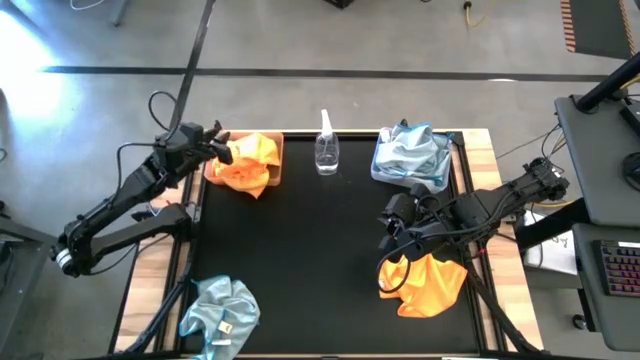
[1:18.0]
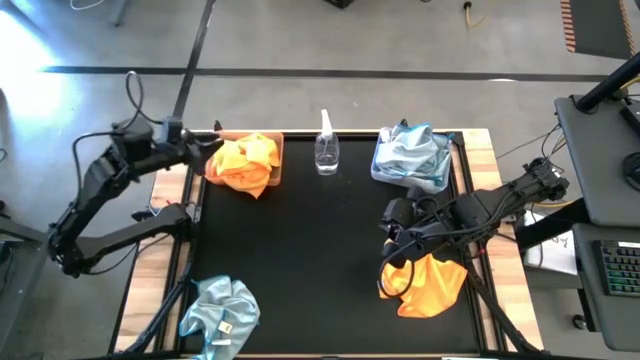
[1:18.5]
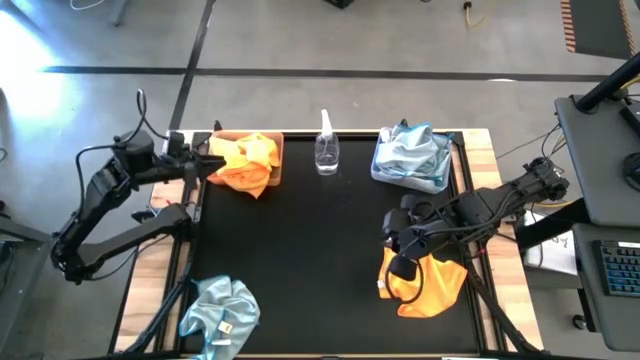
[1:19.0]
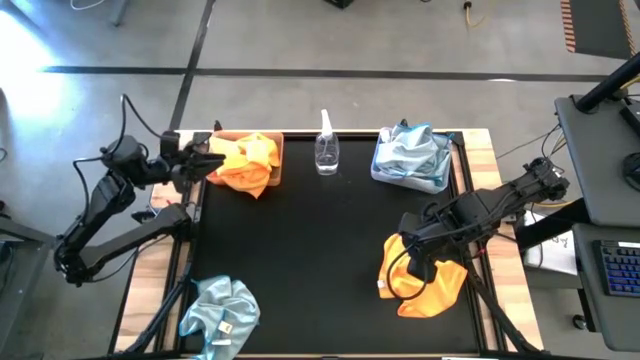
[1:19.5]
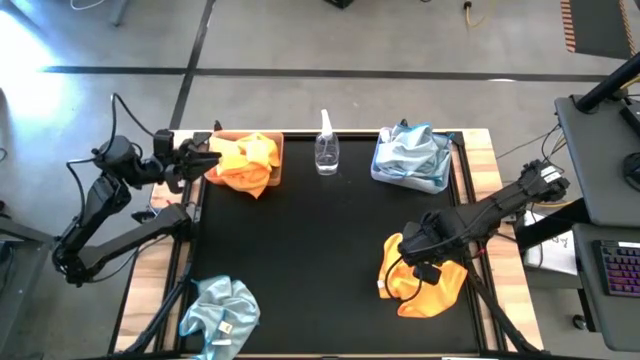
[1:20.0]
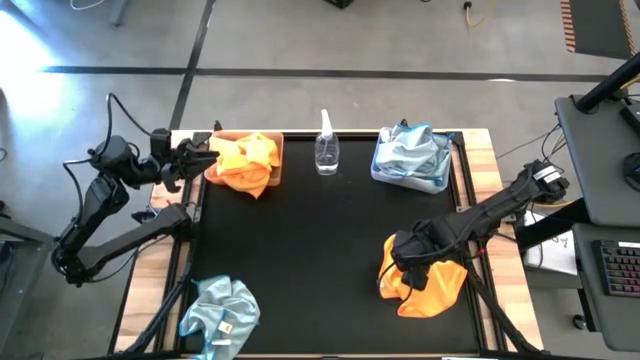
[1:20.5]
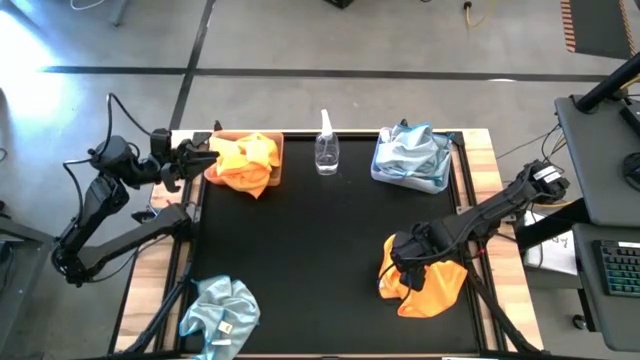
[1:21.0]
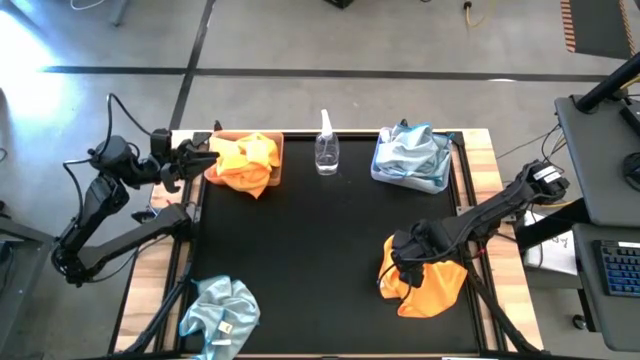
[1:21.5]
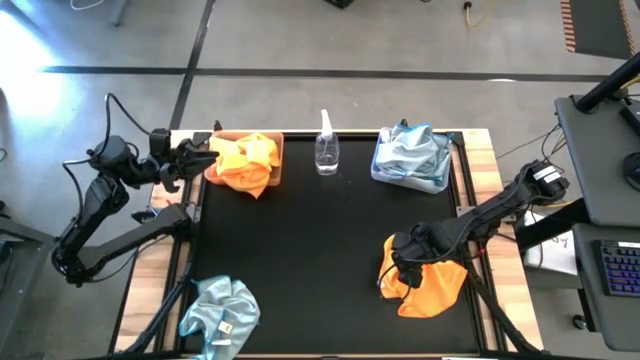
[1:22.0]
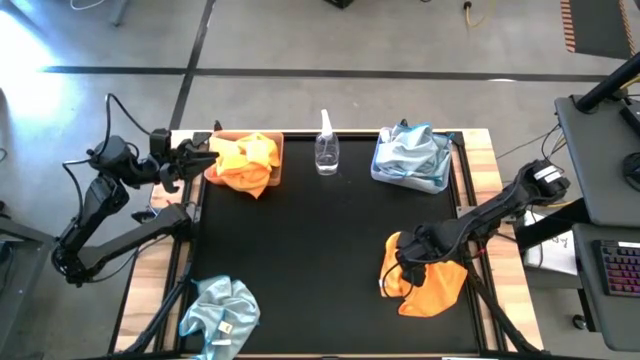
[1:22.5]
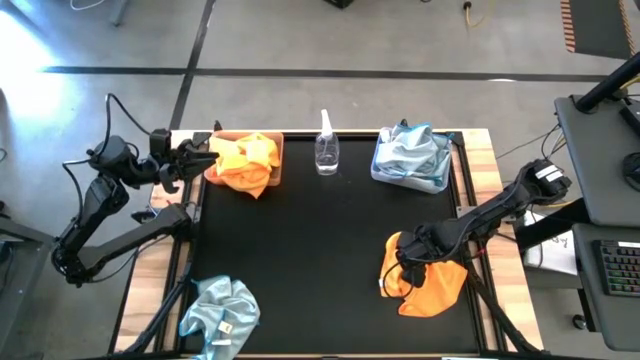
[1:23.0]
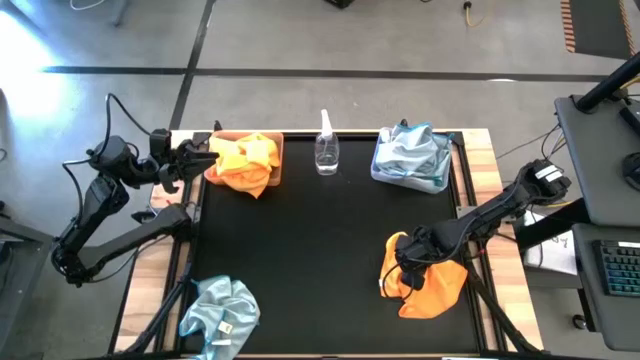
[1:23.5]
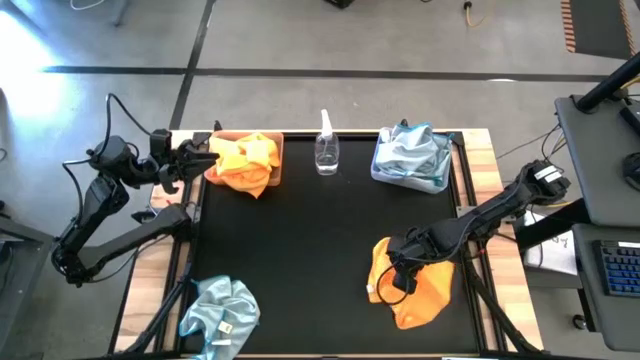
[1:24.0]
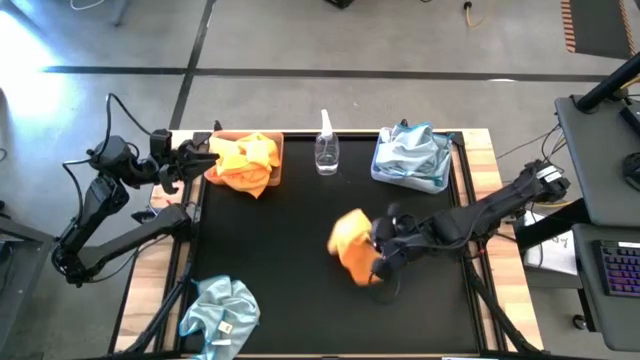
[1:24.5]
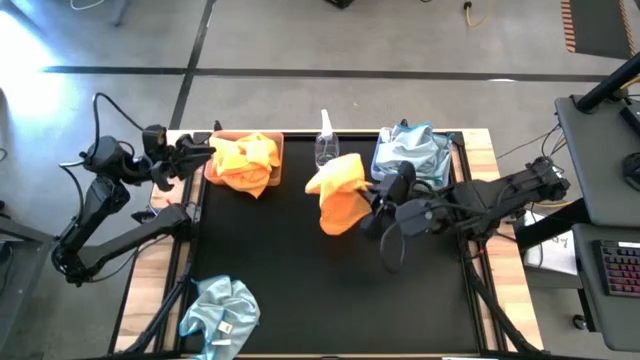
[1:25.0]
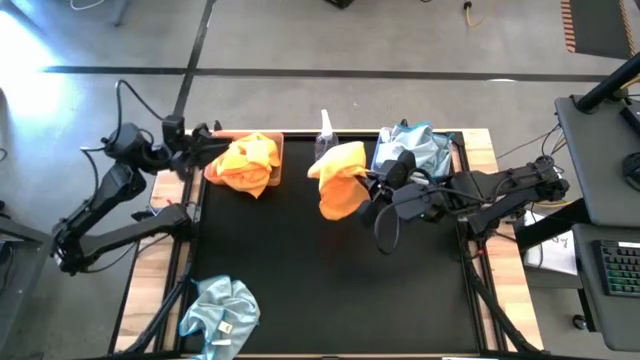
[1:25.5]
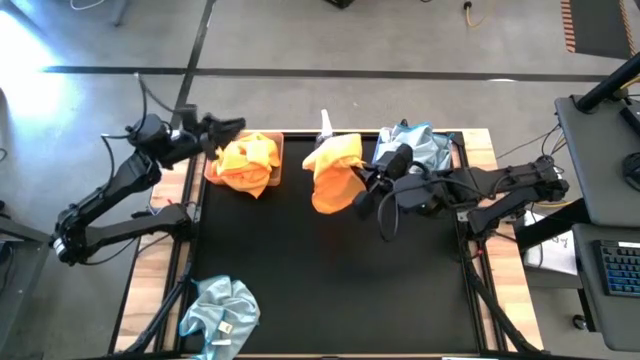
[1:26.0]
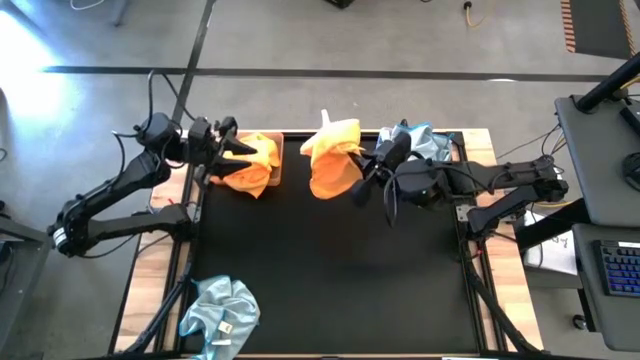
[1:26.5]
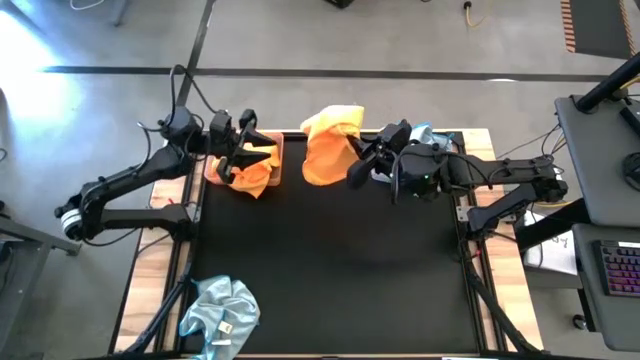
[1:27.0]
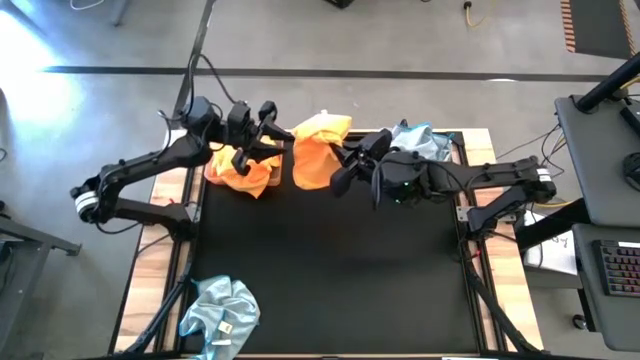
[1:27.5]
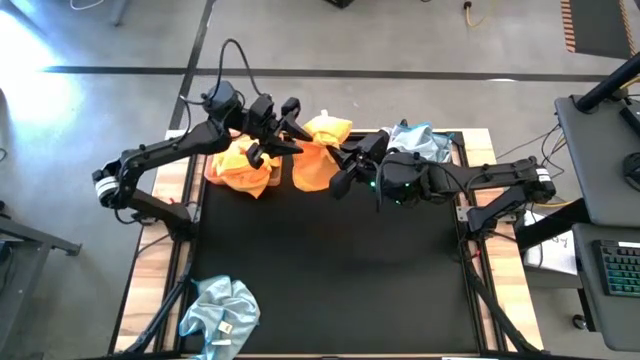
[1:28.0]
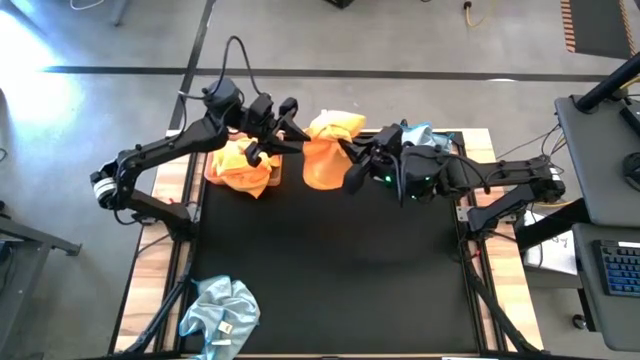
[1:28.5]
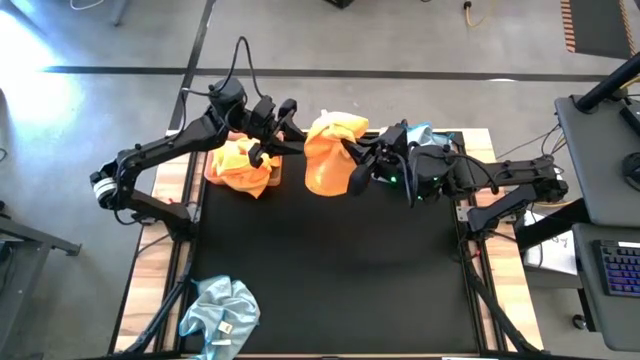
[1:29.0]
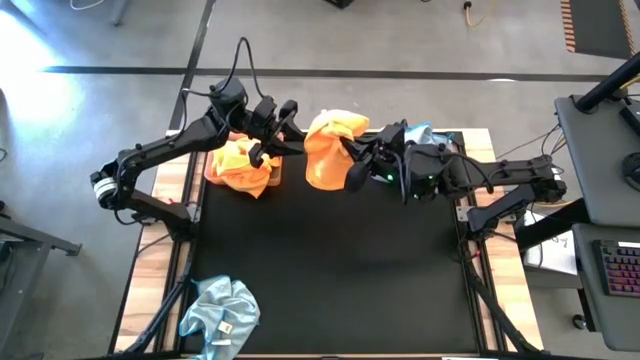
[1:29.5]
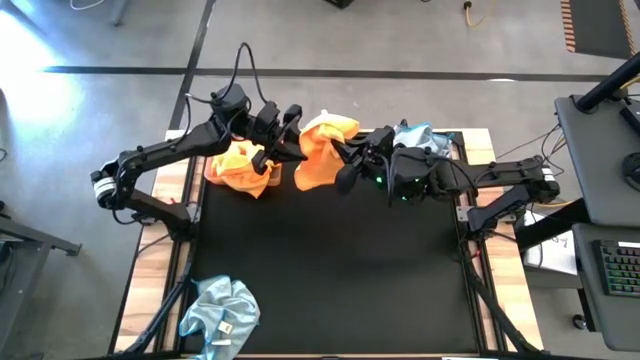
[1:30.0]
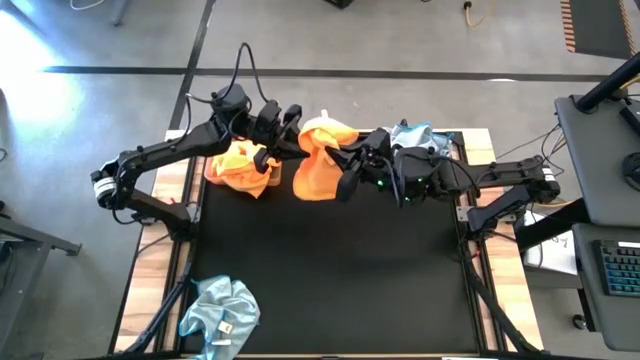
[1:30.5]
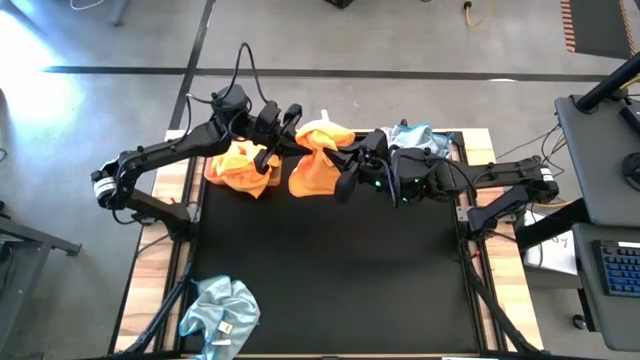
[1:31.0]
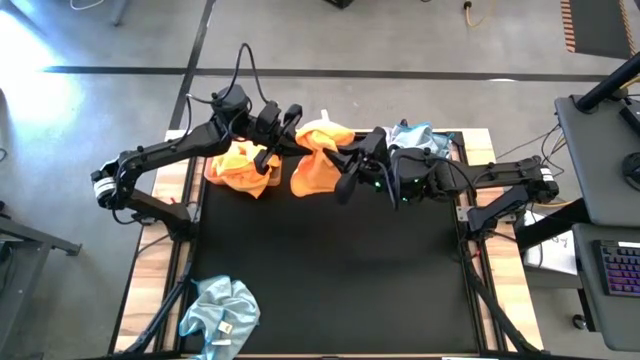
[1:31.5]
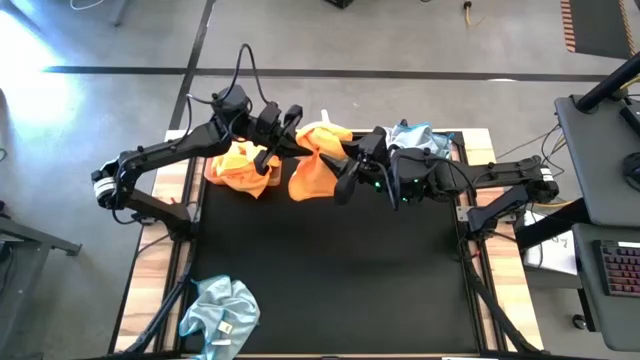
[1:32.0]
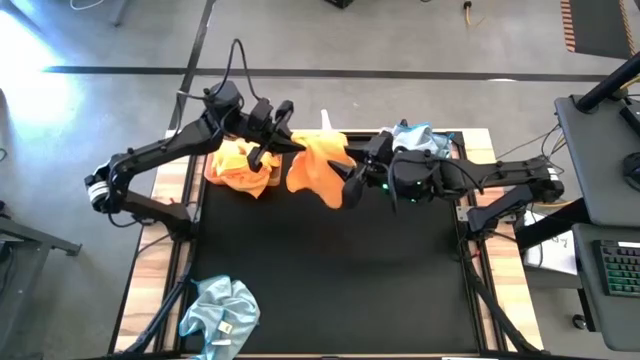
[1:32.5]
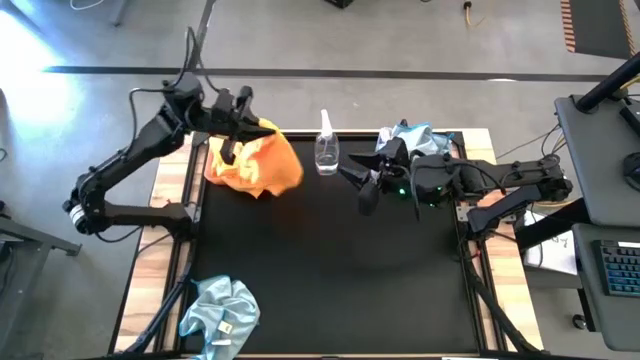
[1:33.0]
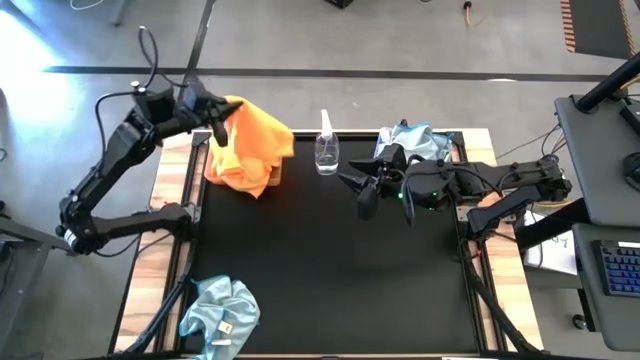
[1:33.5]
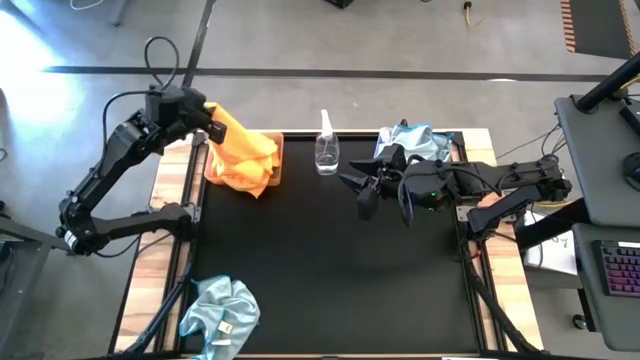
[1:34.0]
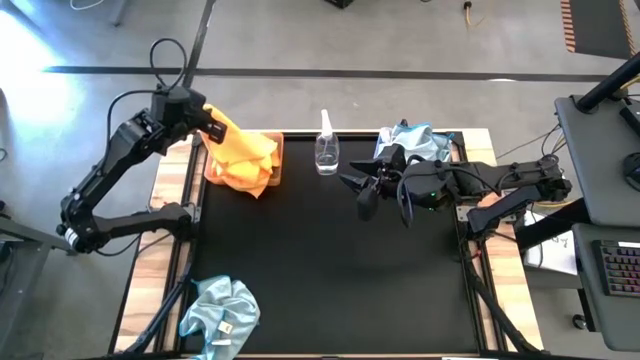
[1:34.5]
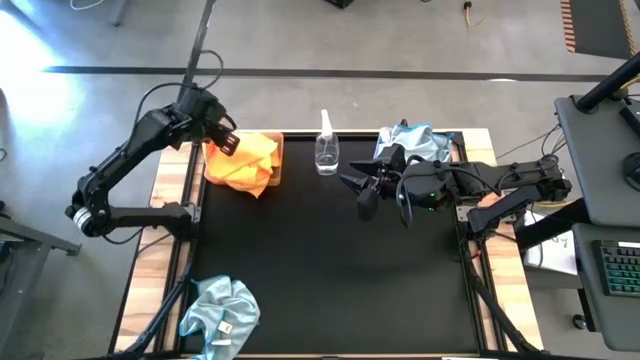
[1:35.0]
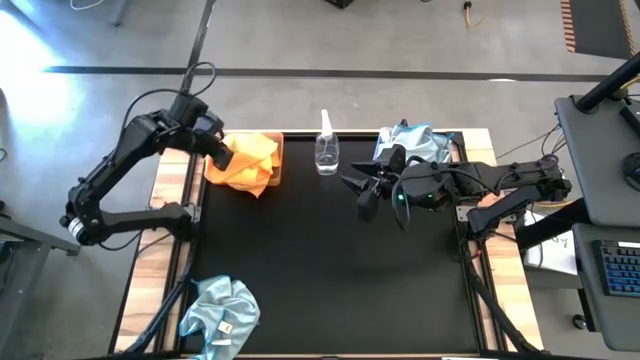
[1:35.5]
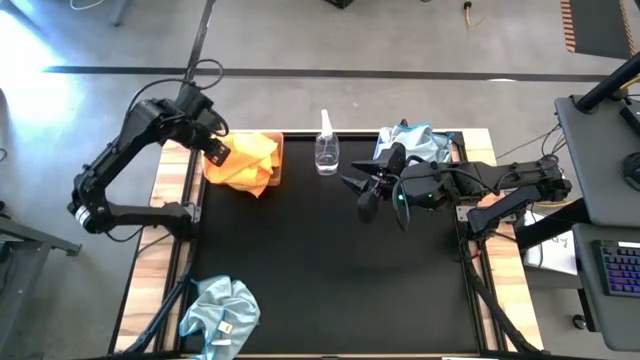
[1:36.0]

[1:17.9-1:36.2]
Task: Sort microfiber towel by color & place in baskets
Put the yellow towel into the orange bin

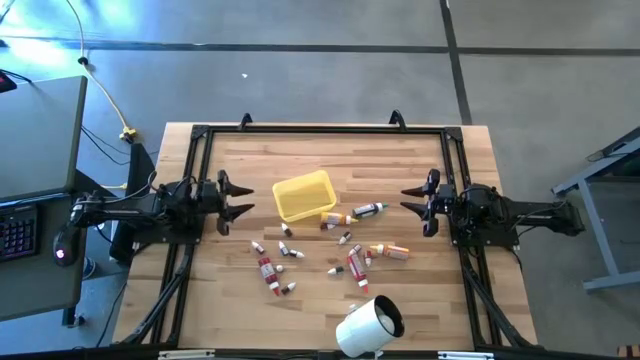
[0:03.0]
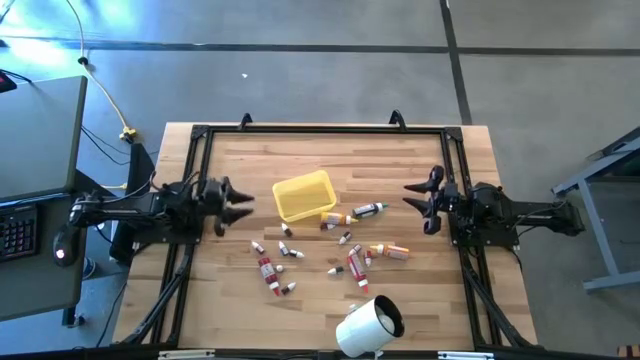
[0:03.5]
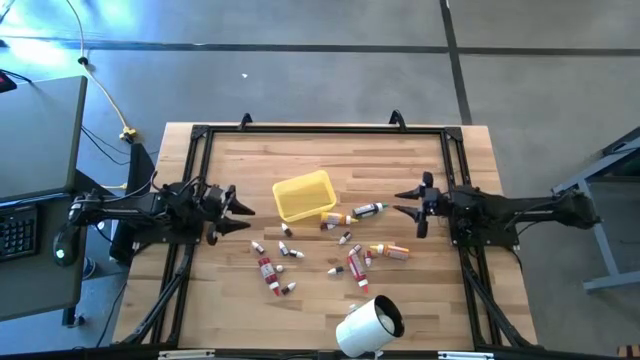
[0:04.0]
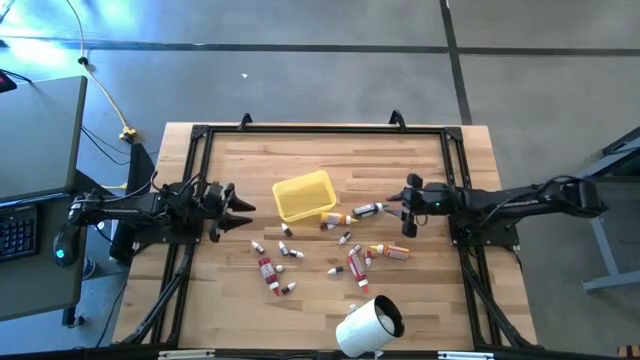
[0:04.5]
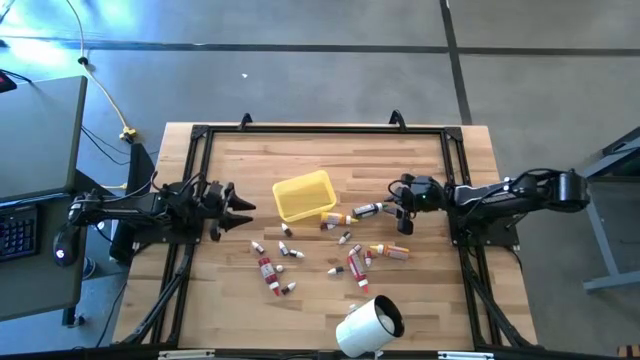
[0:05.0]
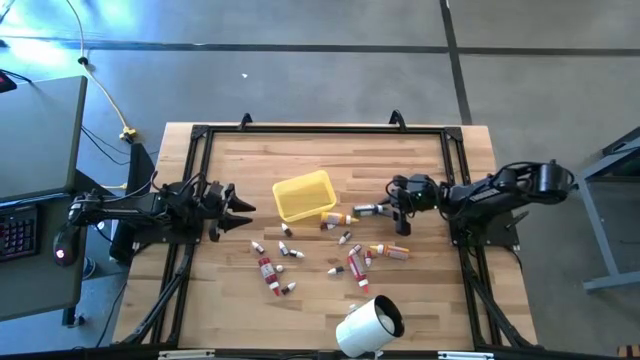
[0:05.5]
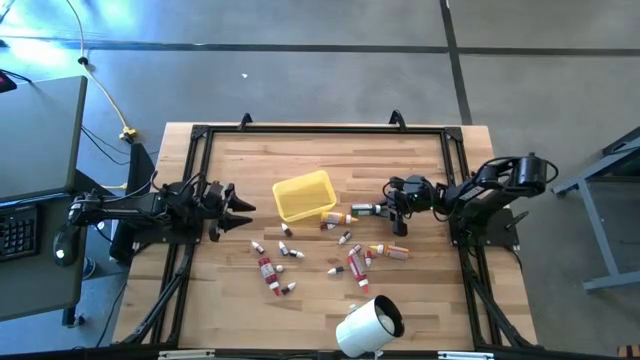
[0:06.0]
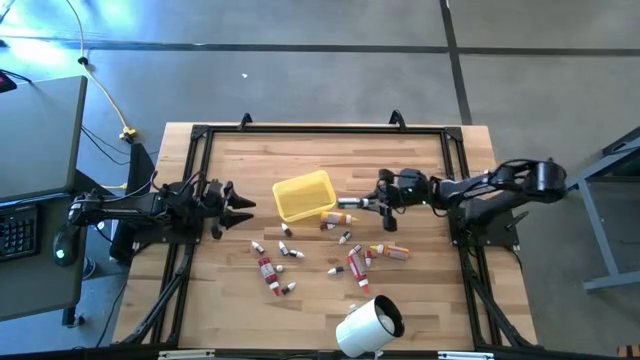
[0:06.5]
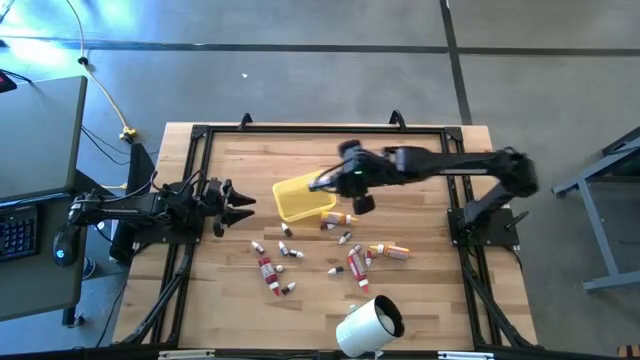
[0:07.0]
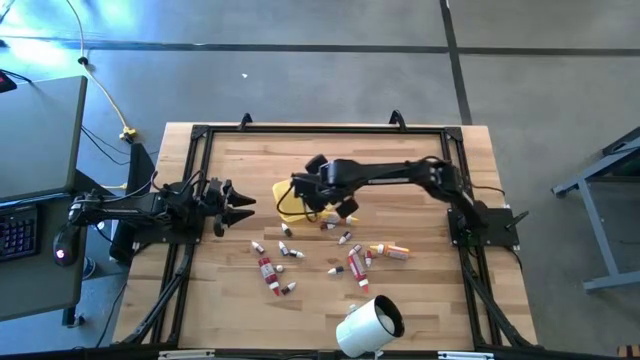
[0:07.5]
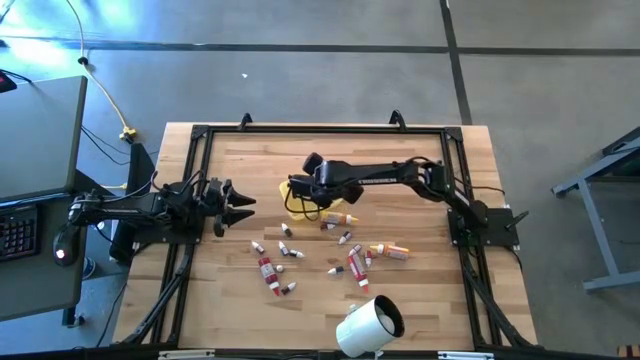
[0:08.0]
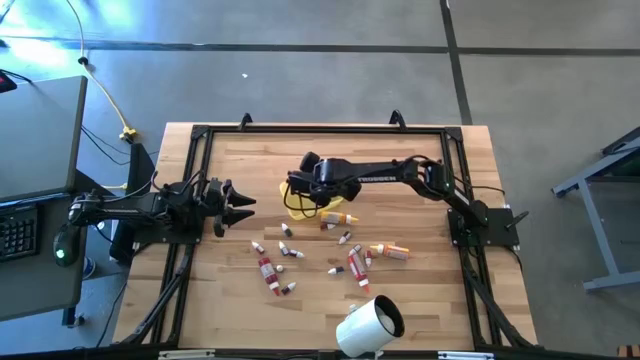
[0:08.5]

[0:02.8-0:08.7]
Task: Pick & Place food coloring
Put the large green food coloring bottle into the yellow container
